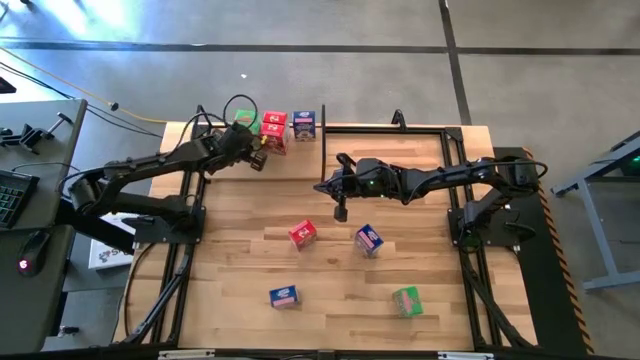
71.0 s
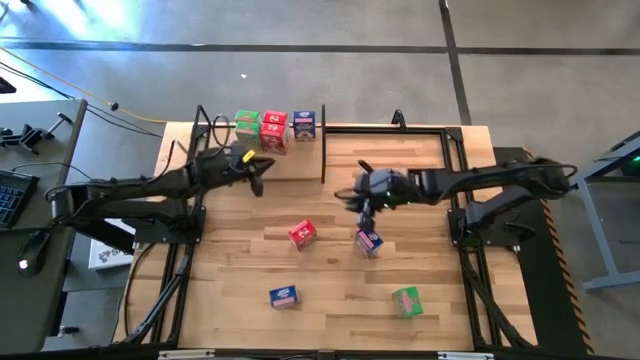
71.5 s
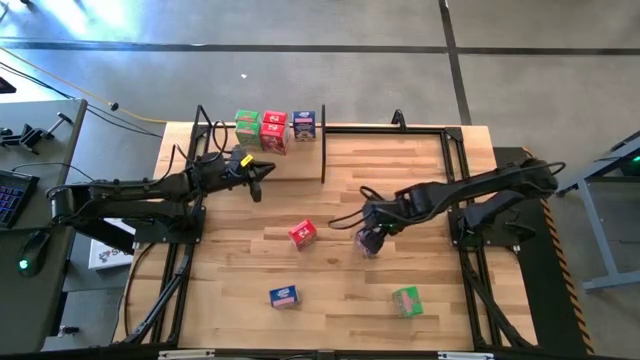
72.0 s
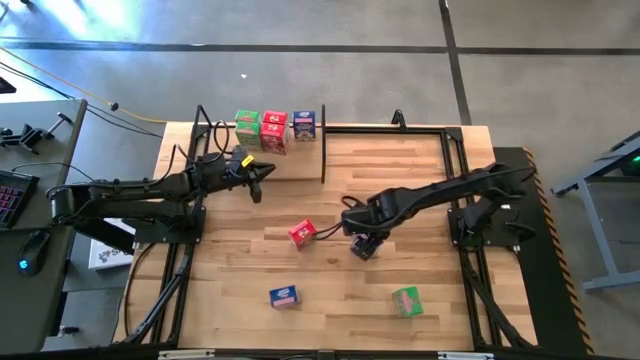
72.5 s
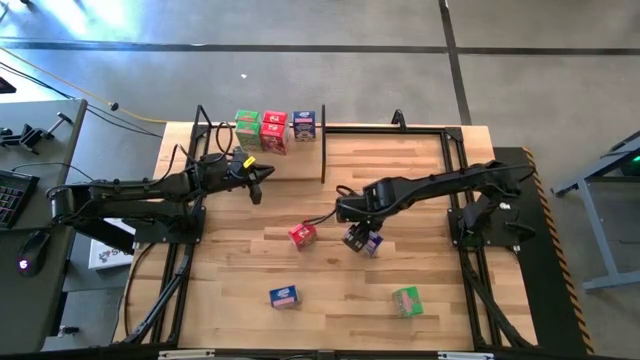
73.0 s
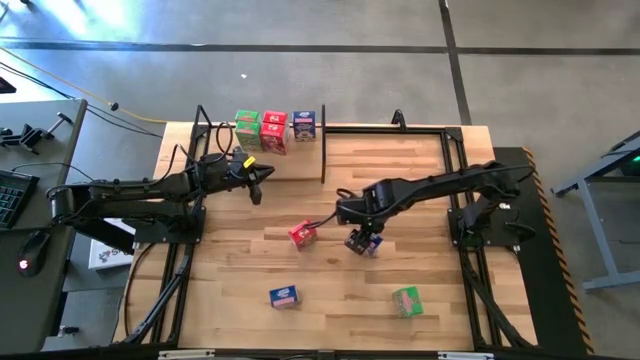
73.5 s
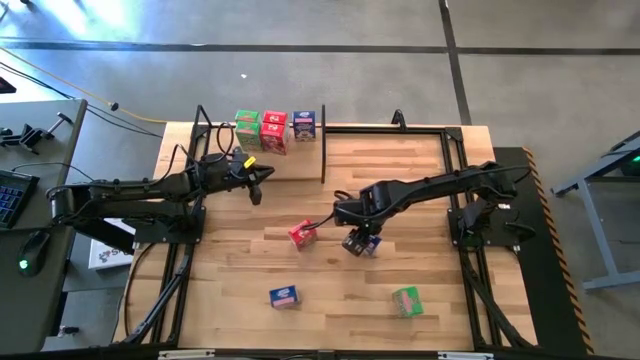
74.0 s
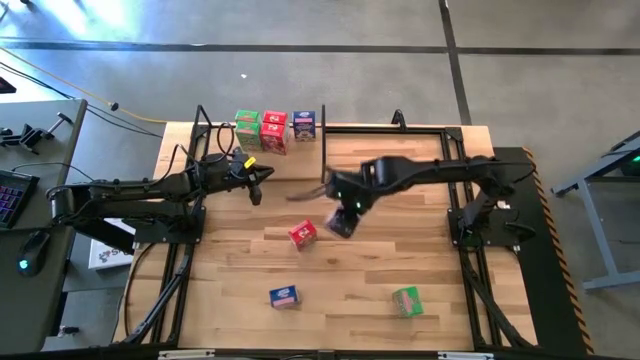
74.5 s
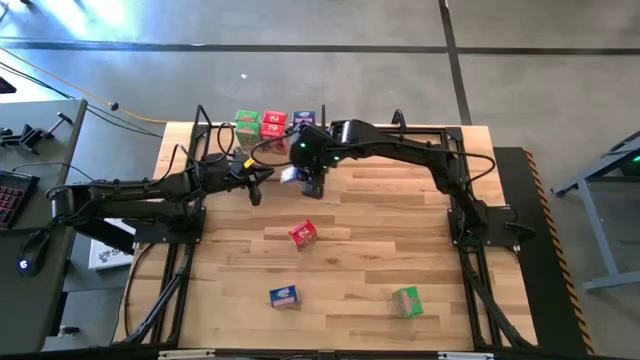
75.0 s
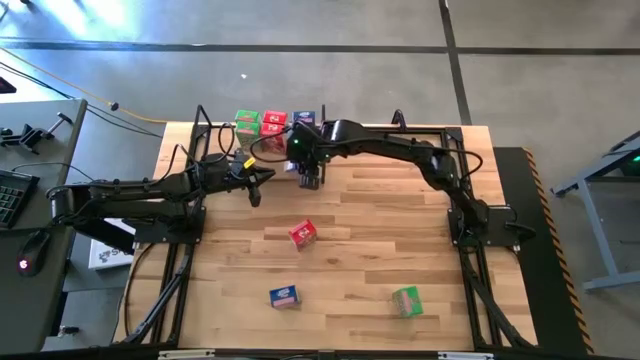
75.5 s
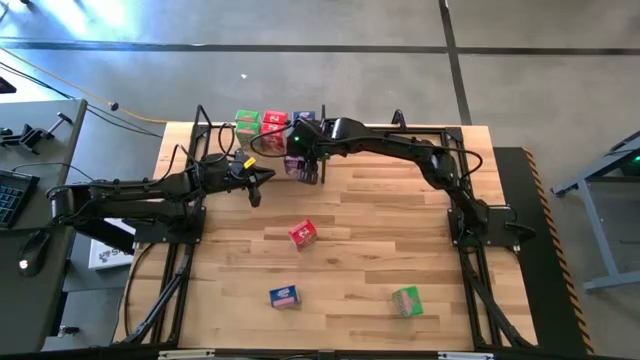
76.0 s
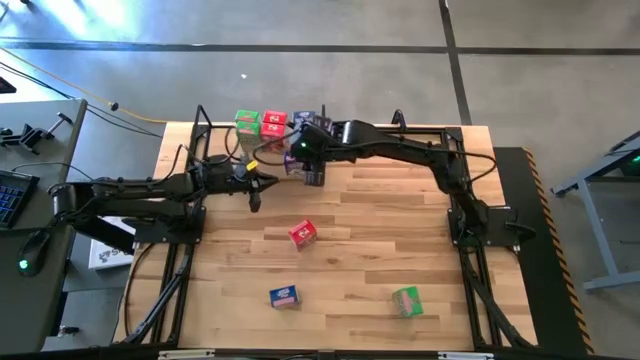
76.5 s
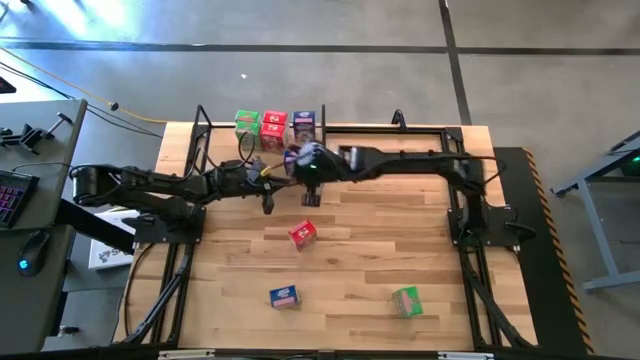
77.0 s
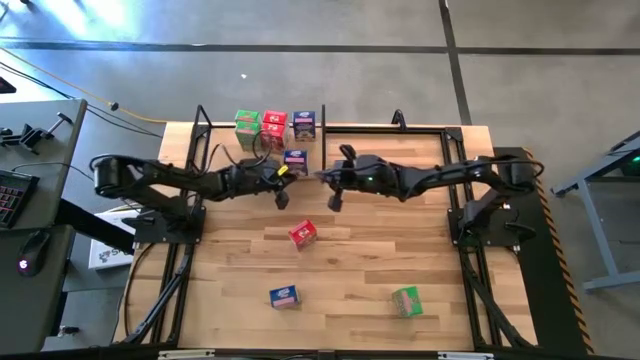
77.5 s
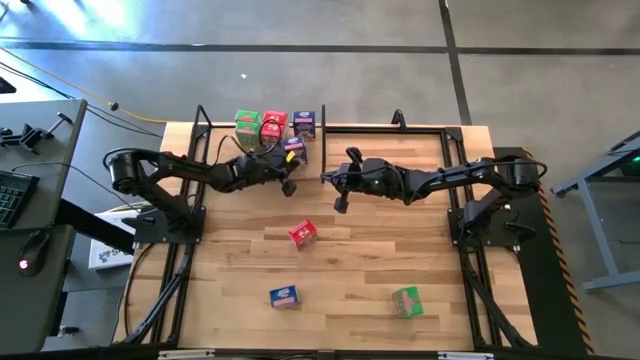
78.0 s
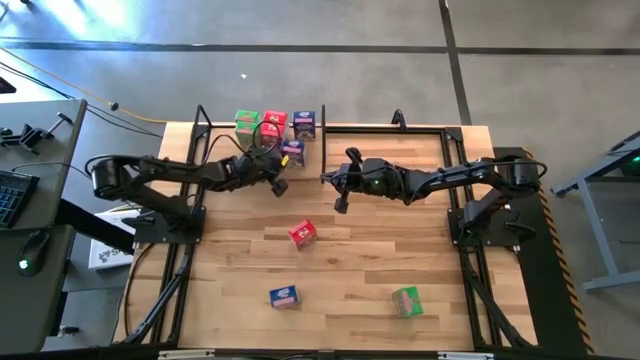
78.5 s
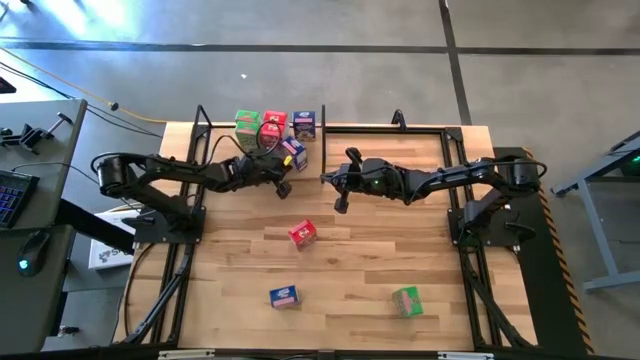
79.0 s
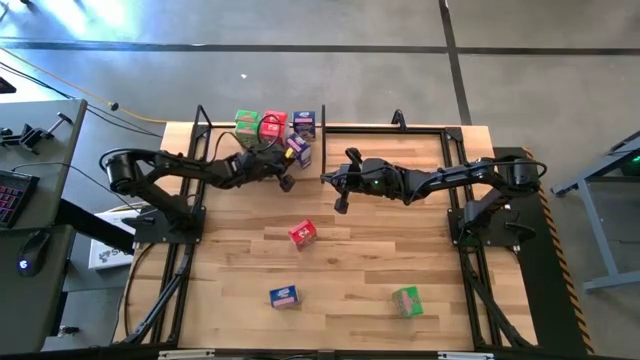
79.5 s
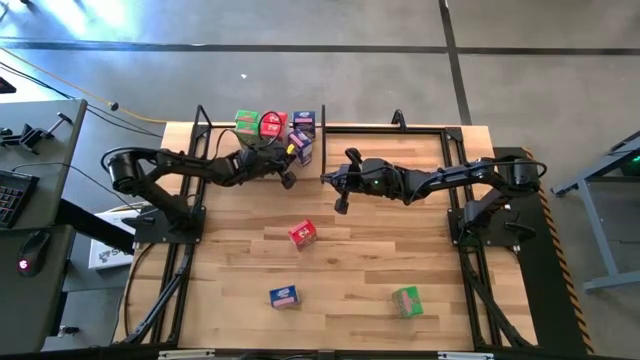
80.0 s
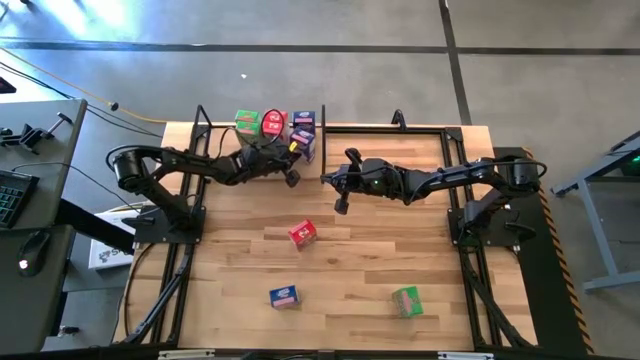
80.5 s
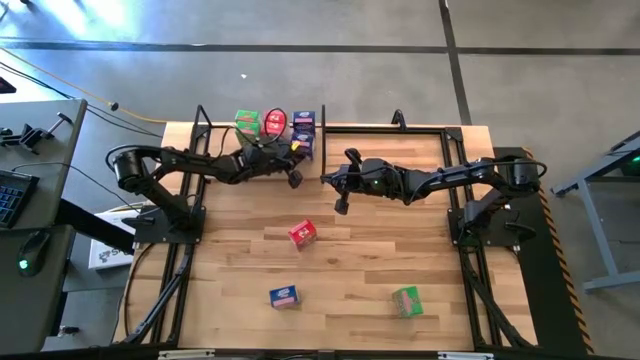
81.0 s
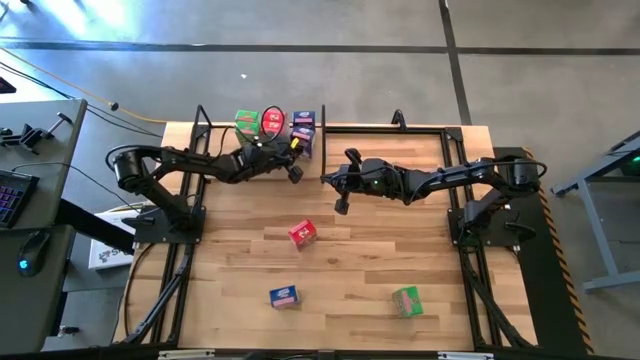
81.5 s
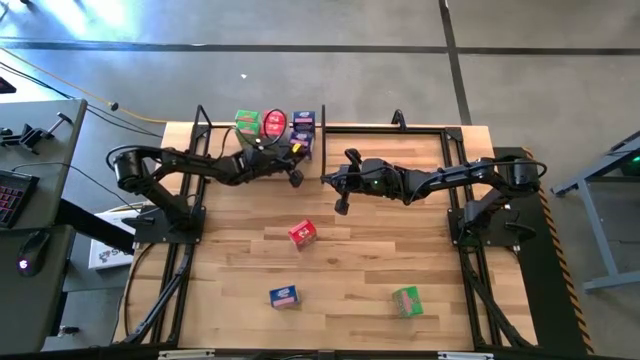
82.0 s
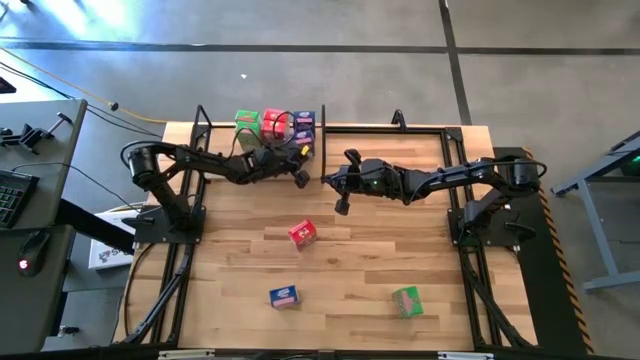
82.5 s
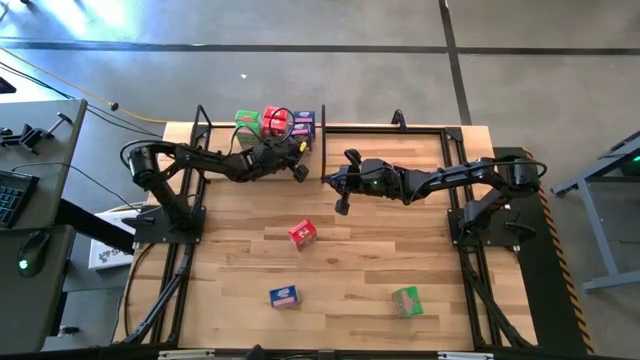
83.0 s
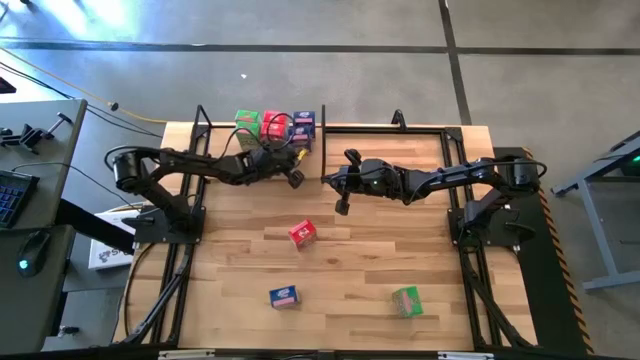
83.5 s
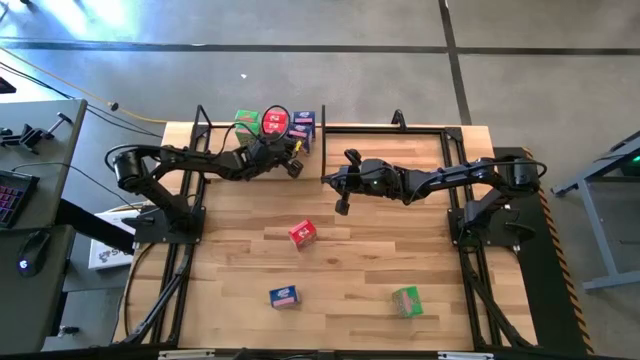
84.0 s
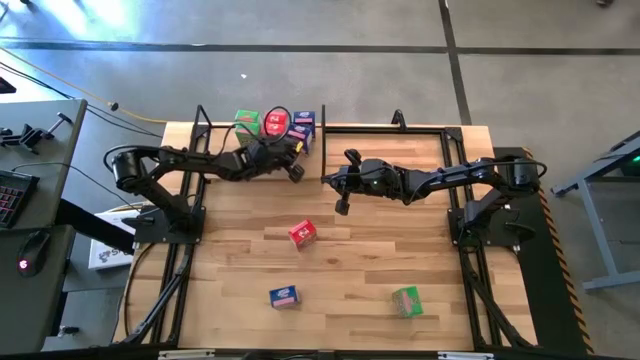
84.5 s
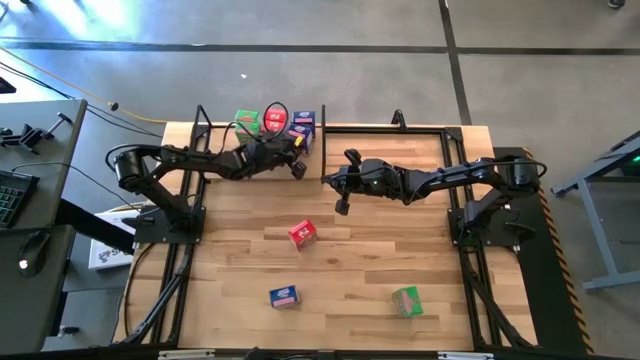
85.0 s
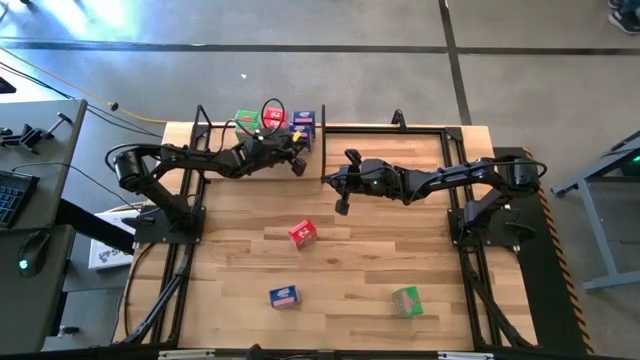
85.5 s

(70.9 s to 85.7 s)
Task: Stack cereal on shelf
Put the top blue cereal box on the shelf aligned with the blue cereal box
